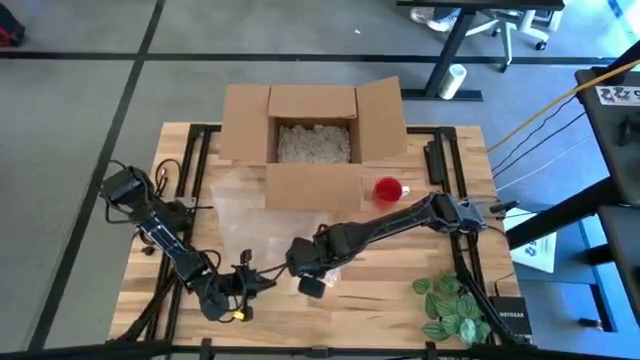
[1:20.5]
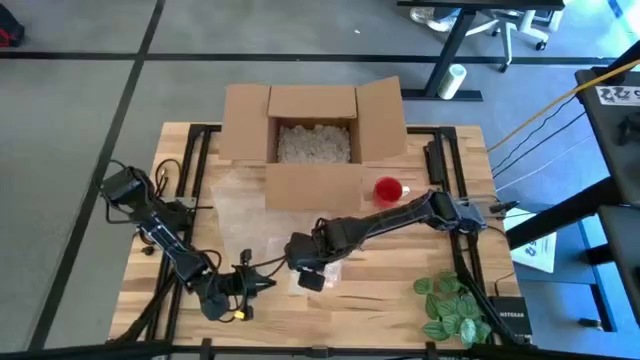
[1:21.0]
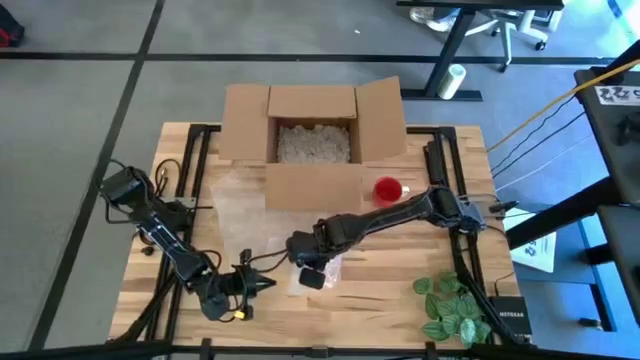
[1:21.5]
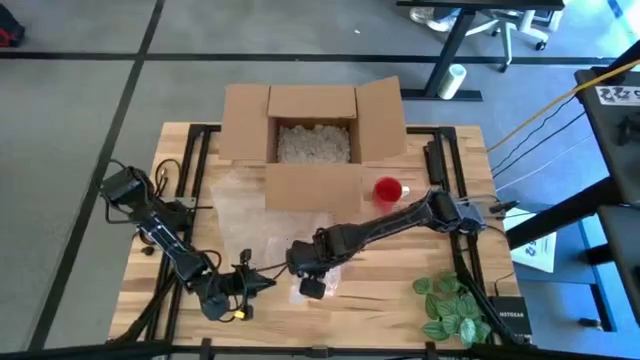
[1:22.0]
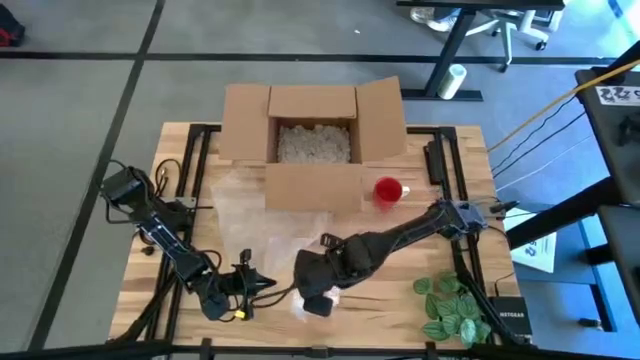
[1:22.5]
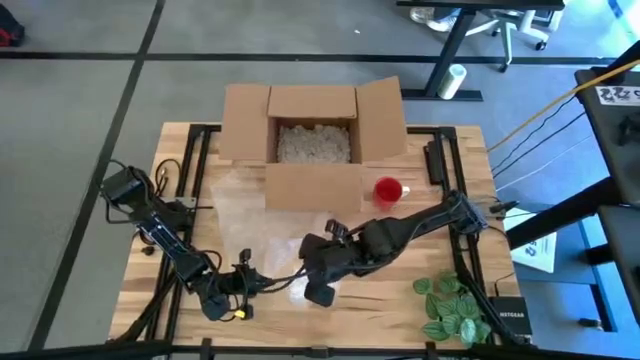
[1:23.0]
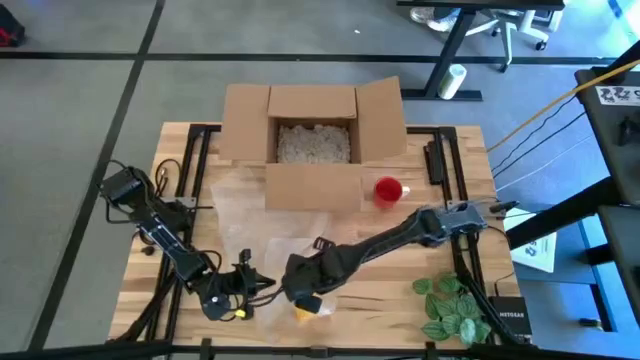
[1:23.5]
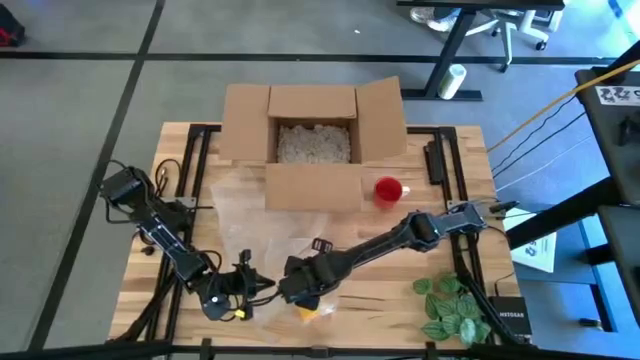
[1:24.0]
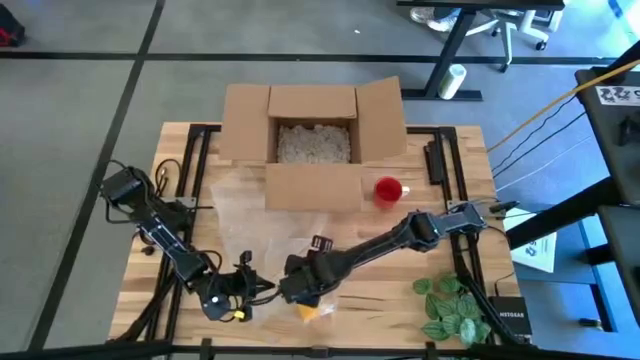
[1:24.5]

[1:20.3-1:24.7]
Task: wrap mug
Put the wrapped yellow mug into the box

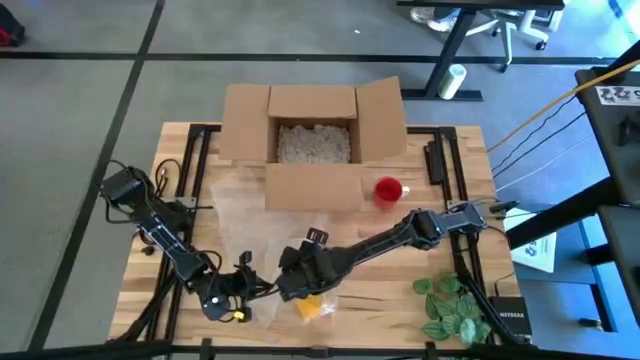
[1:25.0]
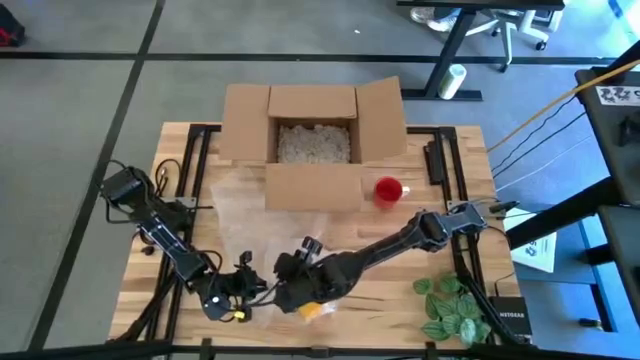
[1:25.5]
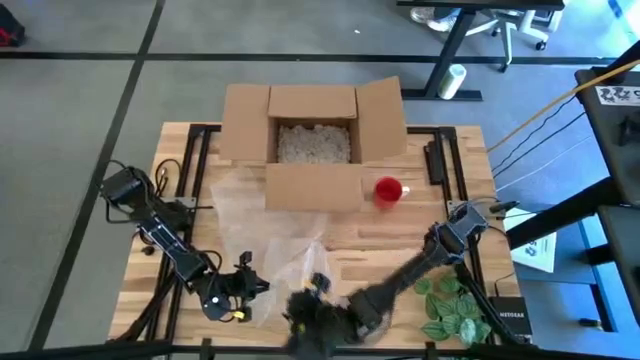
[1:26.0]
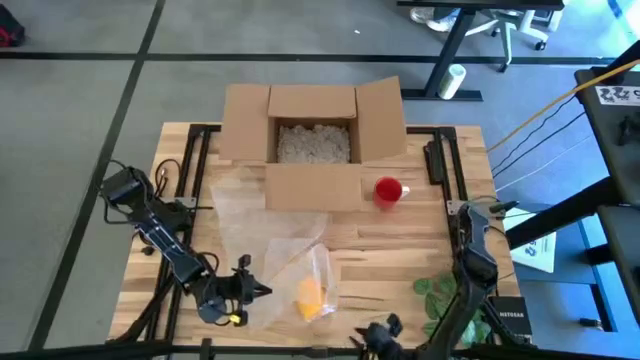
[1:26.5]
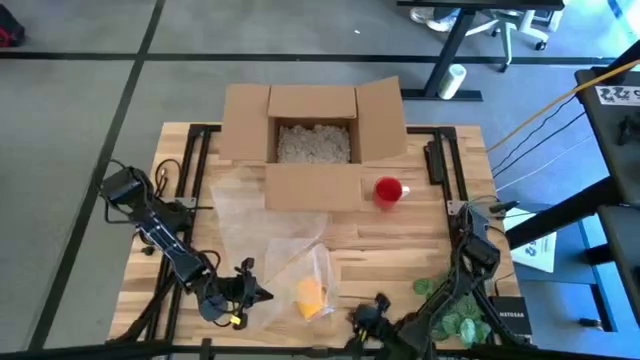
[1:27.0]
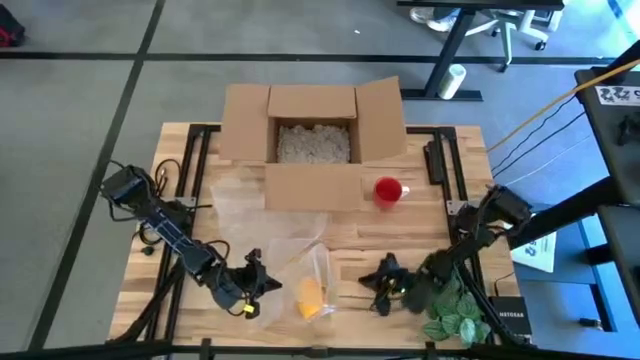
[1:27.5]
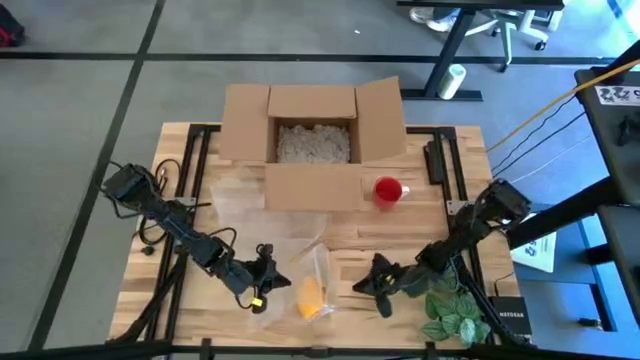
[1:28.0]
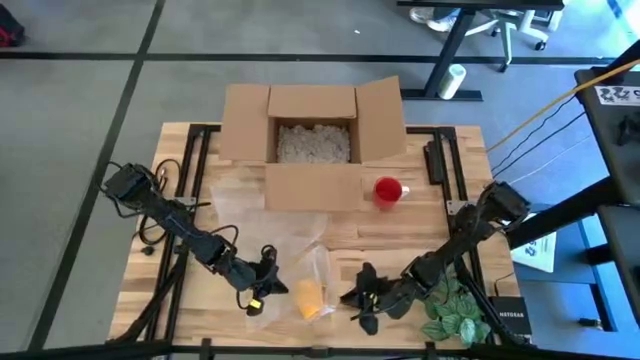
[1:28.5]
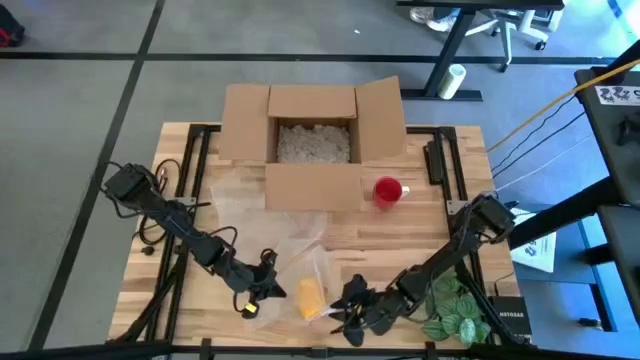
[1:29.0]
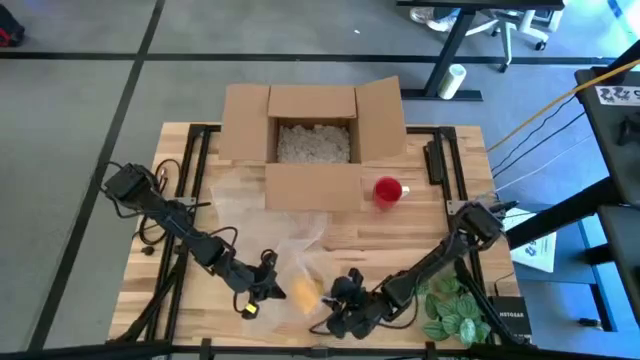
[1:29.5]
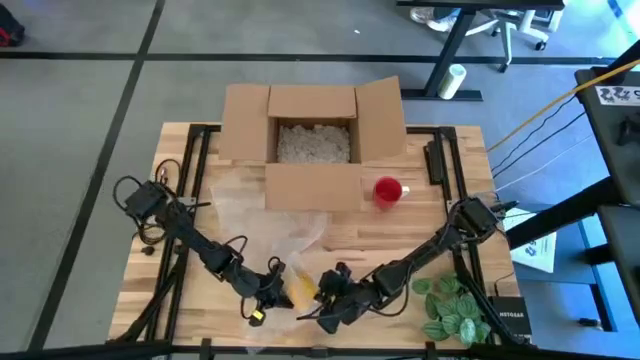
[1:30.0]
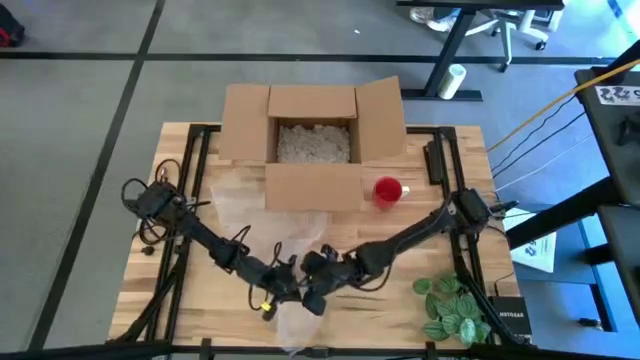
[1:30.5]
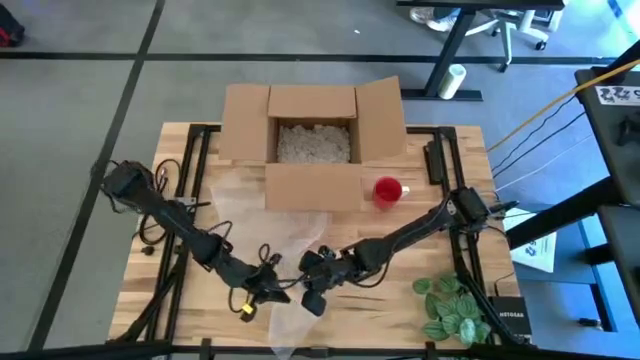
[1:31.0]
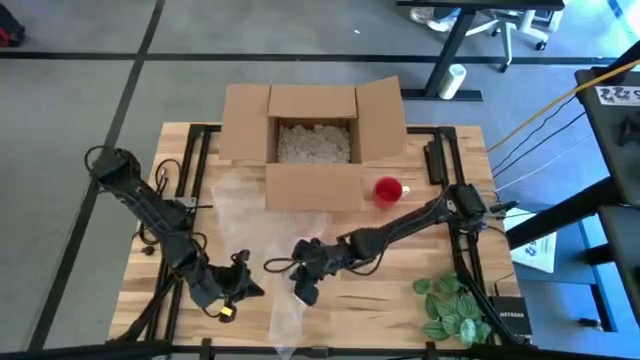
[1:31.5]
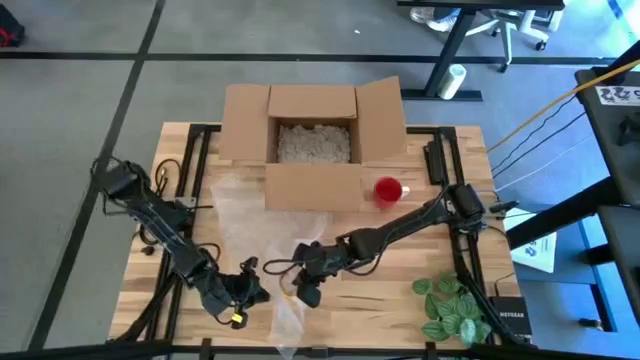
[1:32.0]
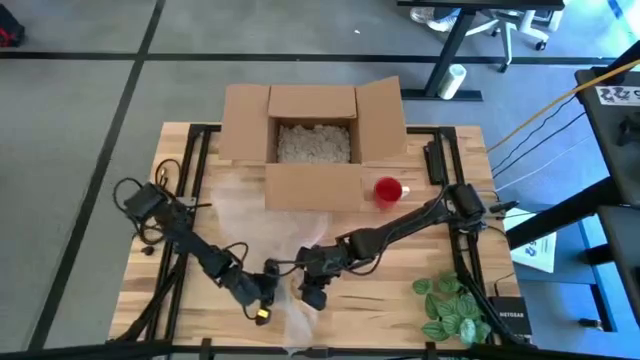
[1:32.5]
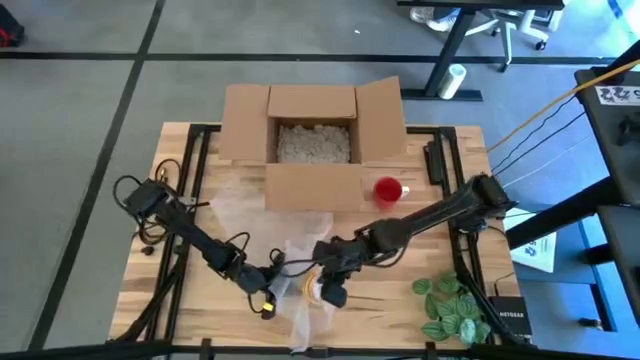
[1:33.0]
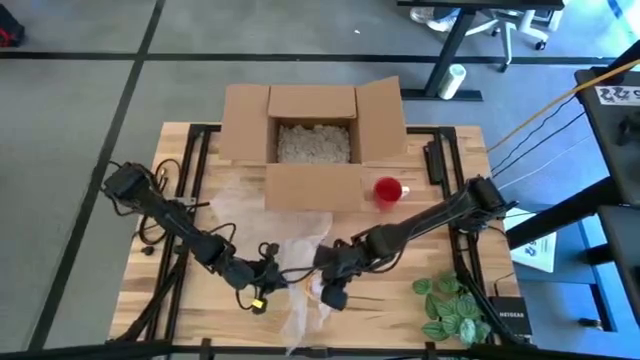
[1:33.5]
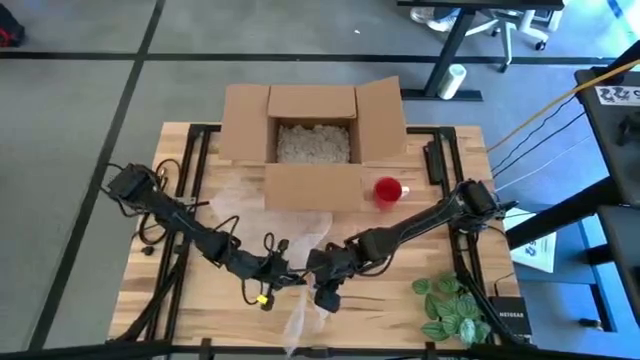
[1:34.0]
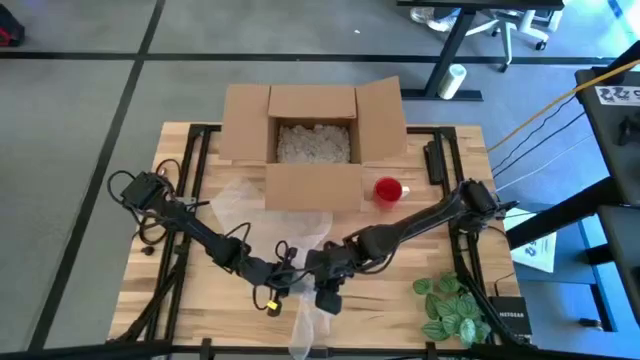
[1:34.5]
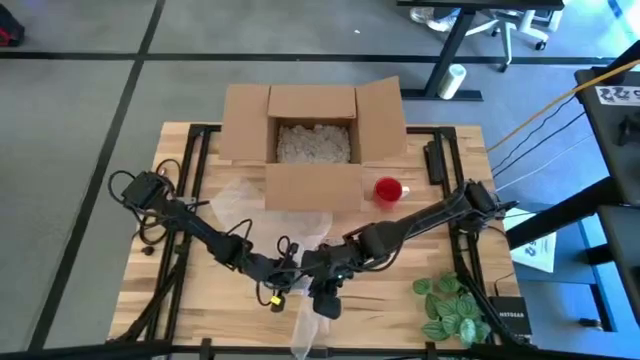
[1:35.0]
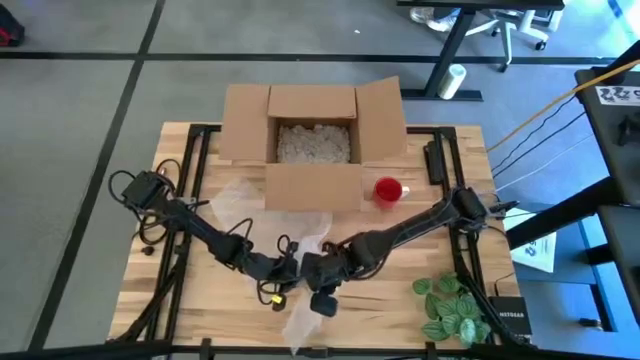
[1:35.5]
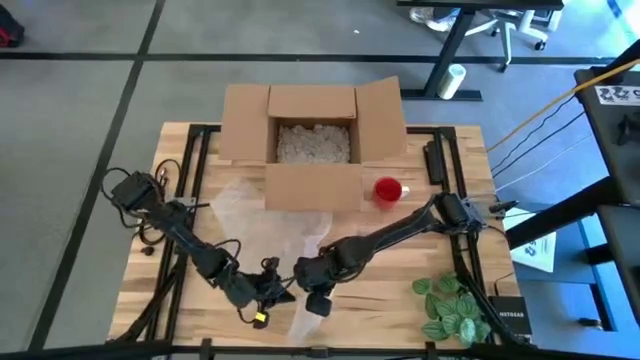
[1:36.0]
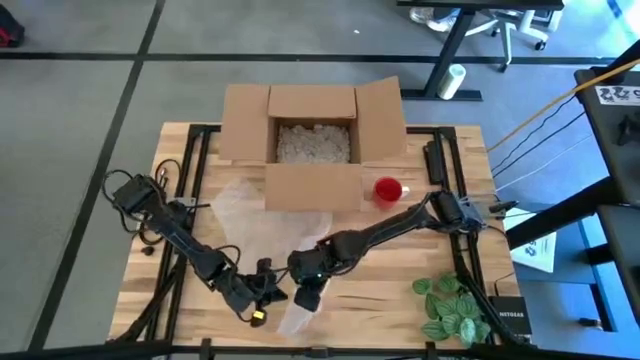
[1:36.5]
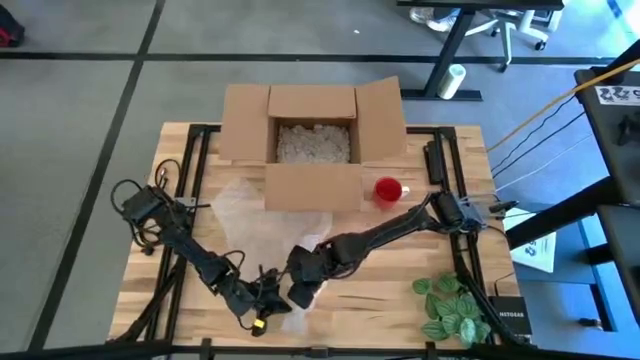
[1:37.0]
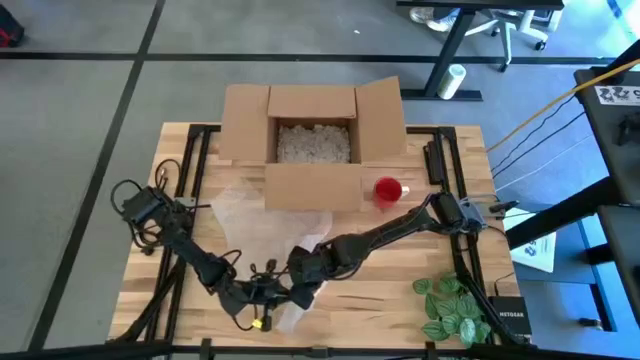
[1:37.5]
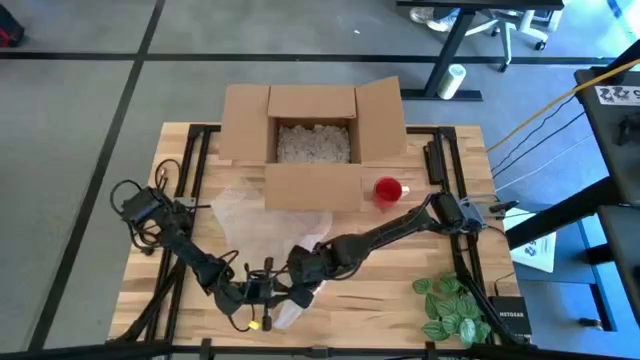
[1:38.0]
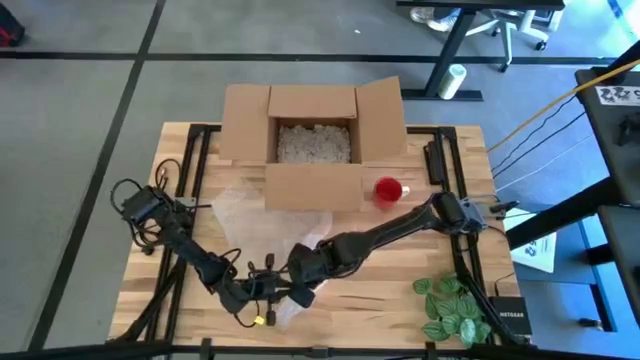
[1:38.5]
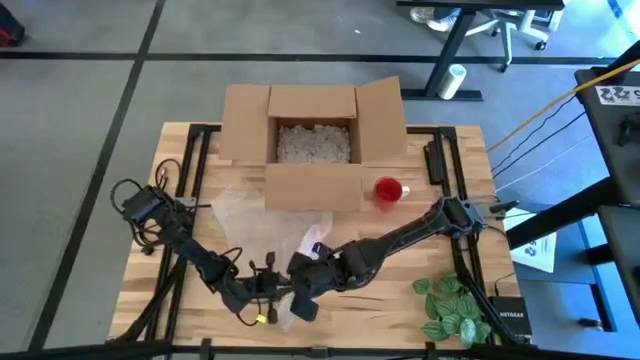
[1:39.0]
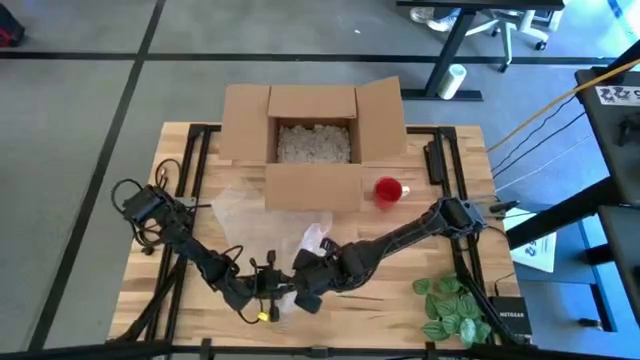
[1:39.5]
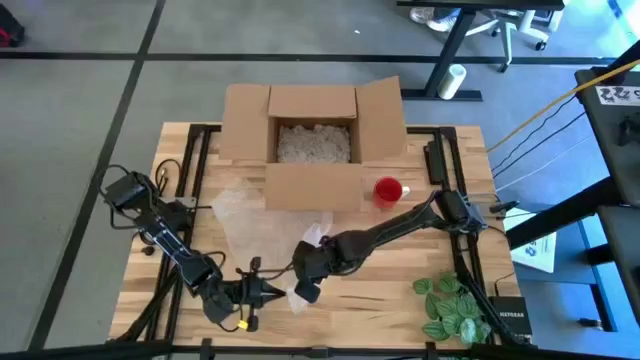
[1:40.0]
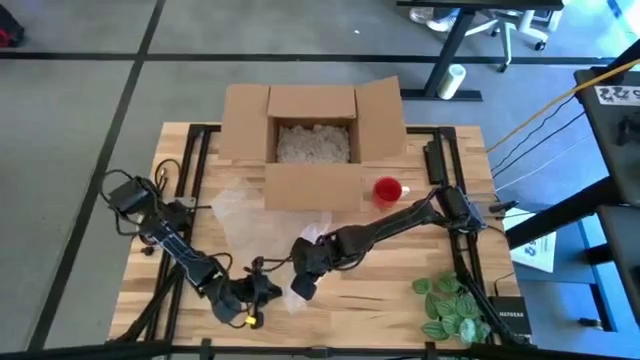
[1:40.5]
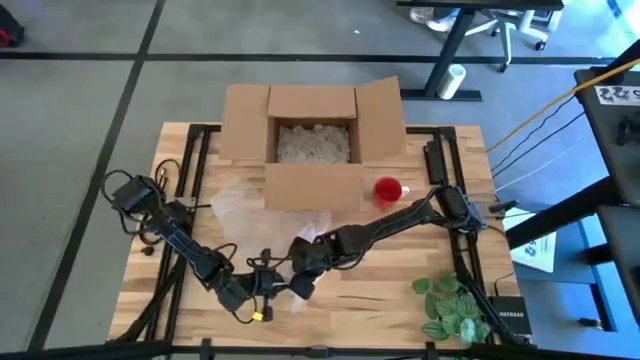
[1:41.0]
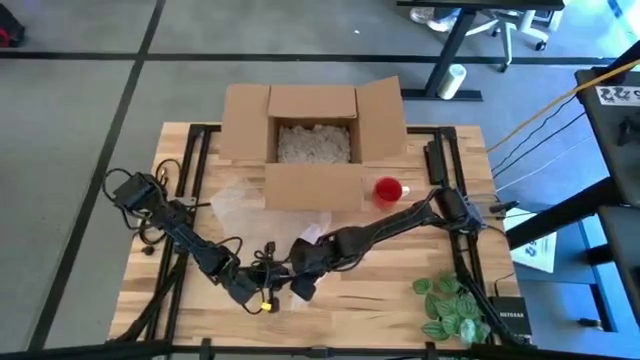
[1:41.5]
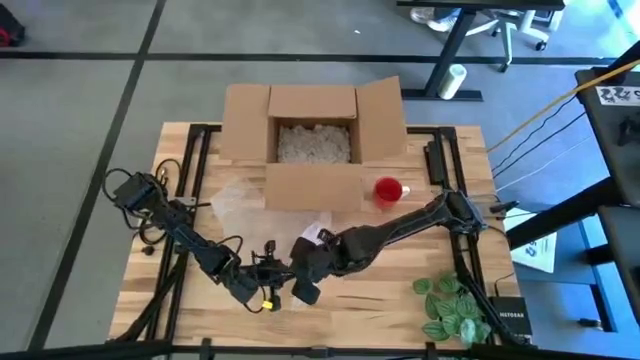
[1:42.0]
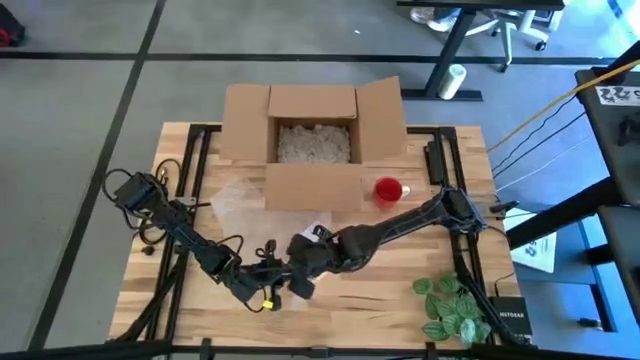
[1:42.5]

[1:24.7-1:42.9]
Wrap the yellow mug using the bubble wrap
